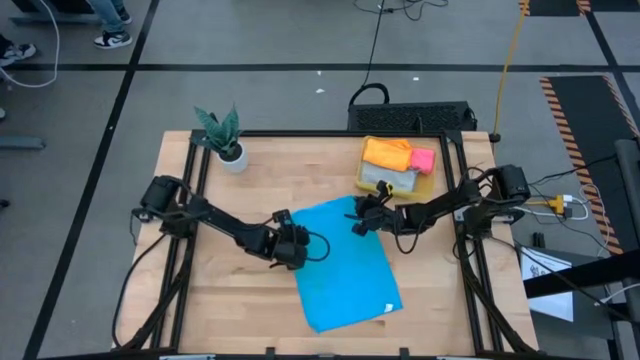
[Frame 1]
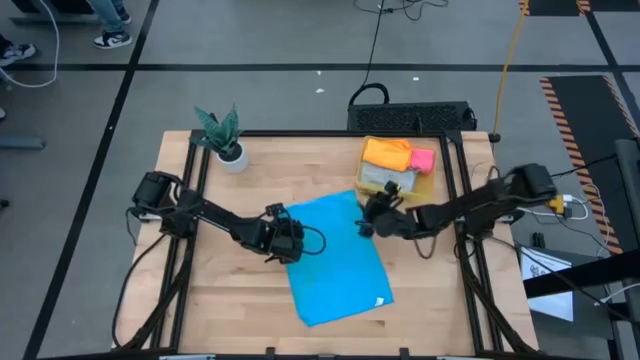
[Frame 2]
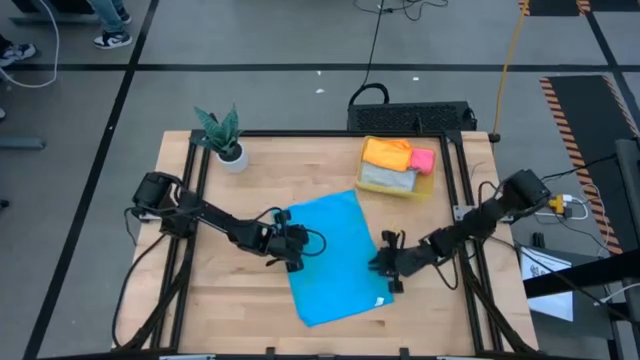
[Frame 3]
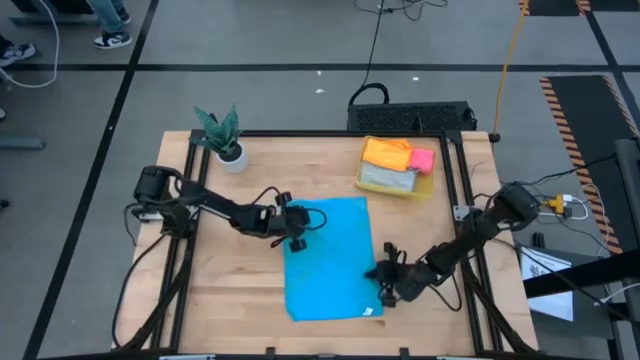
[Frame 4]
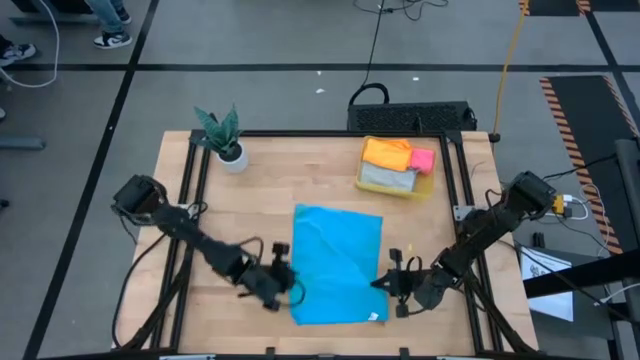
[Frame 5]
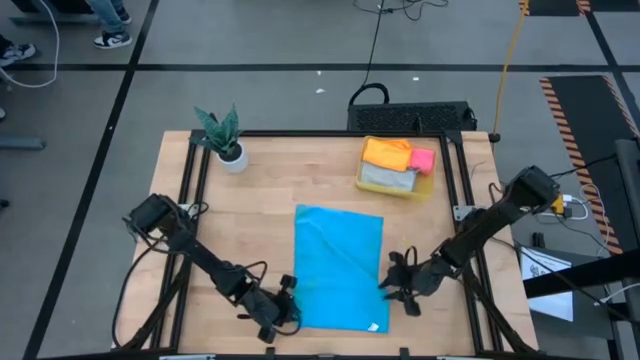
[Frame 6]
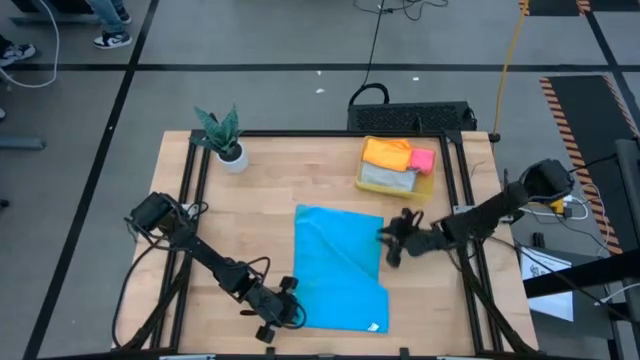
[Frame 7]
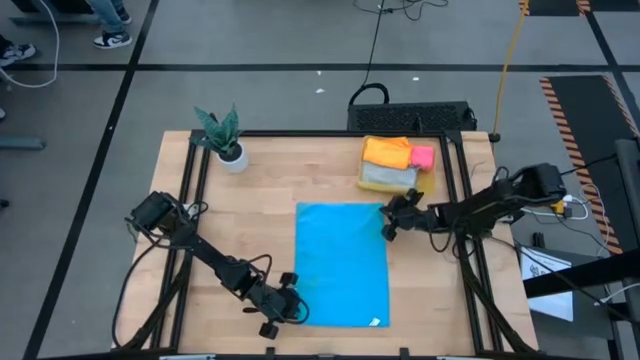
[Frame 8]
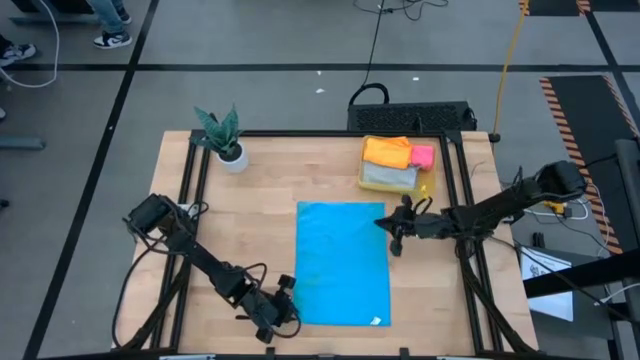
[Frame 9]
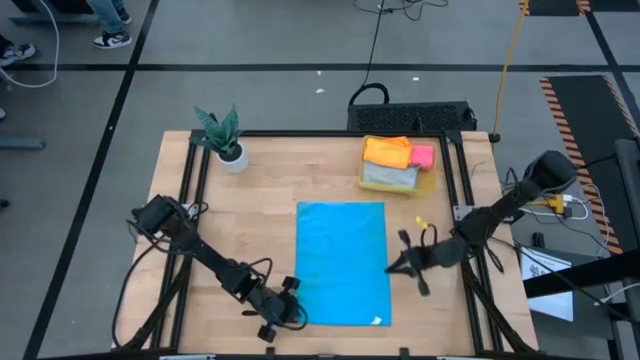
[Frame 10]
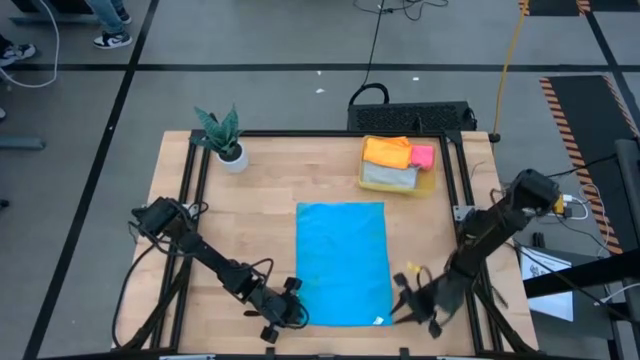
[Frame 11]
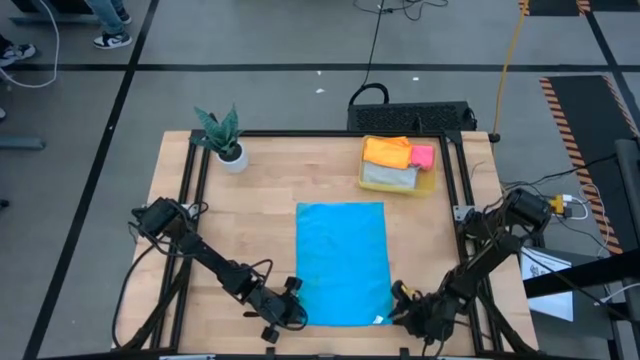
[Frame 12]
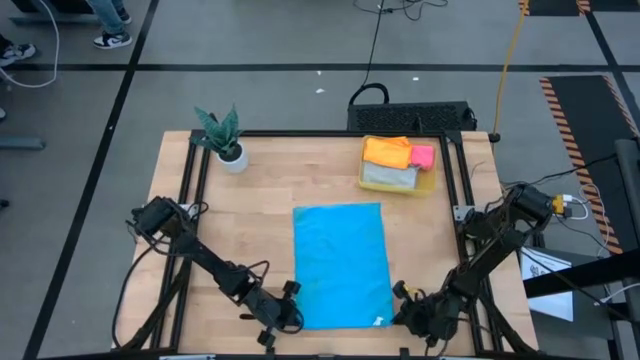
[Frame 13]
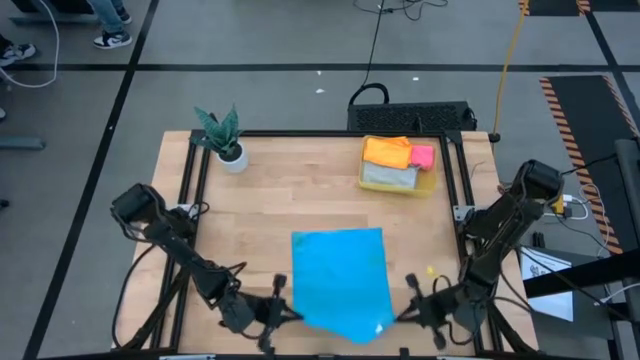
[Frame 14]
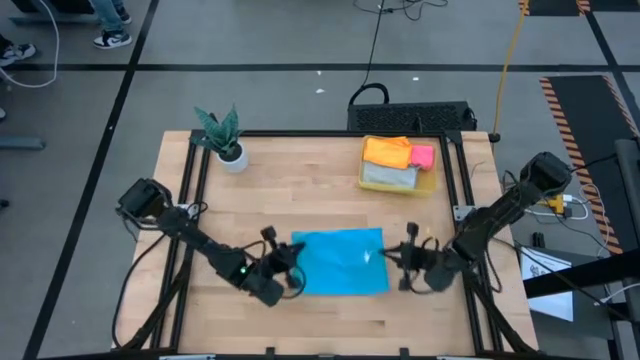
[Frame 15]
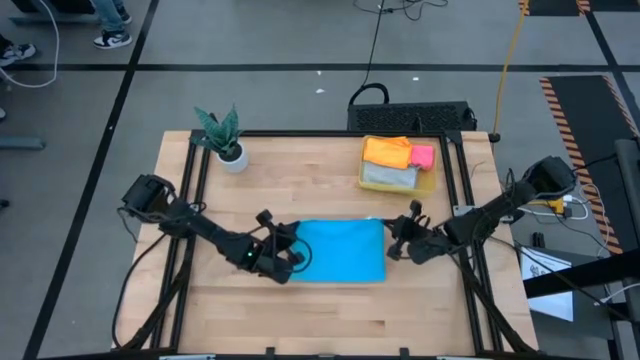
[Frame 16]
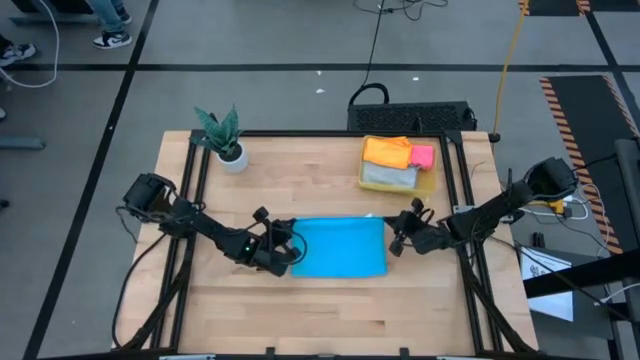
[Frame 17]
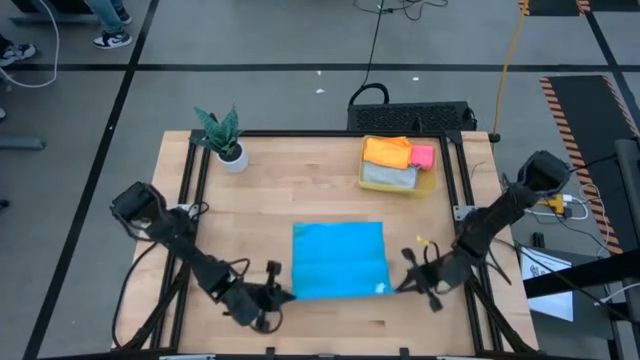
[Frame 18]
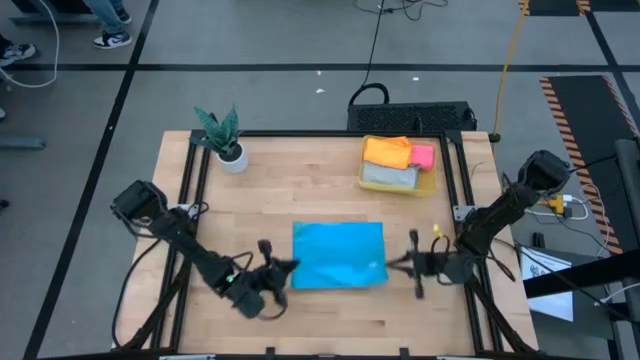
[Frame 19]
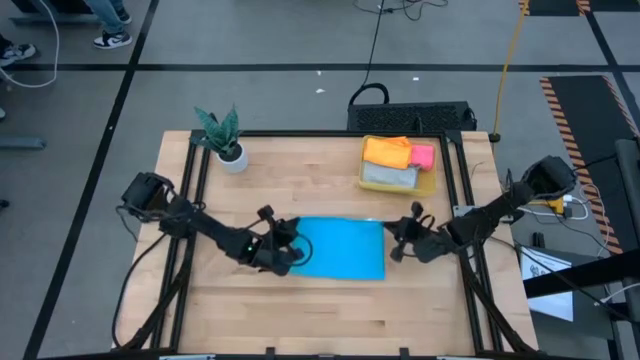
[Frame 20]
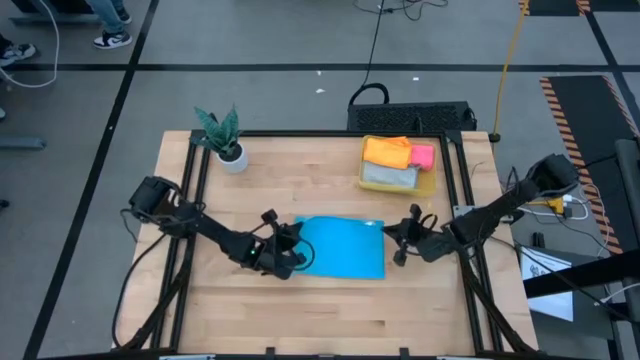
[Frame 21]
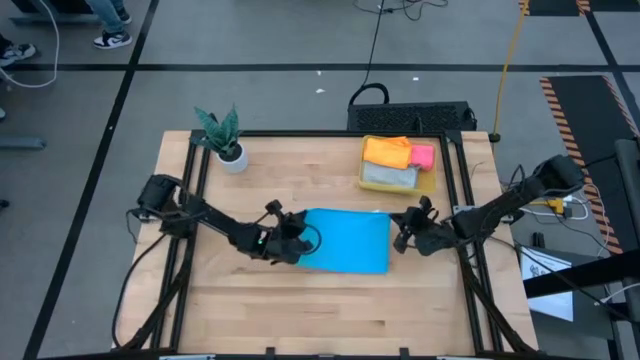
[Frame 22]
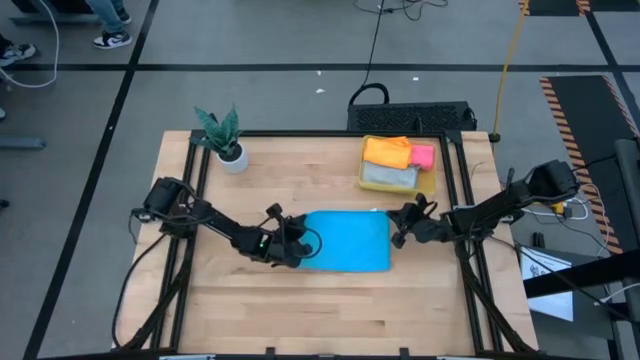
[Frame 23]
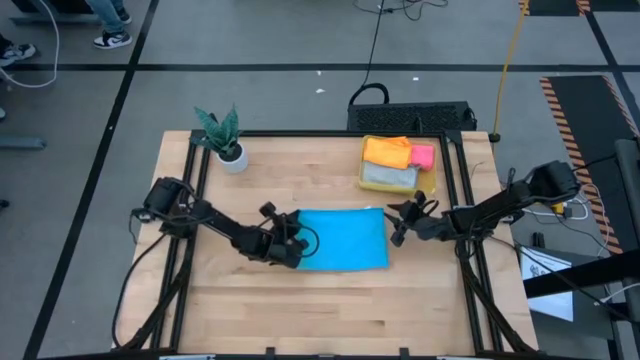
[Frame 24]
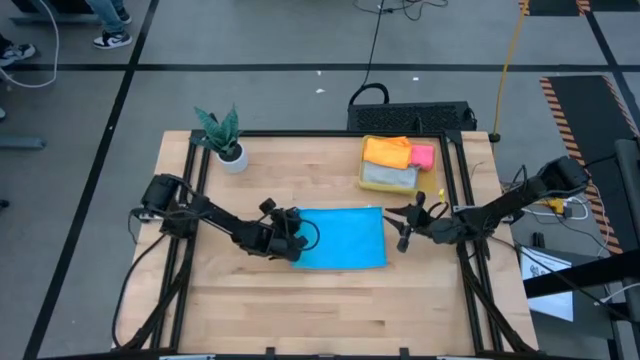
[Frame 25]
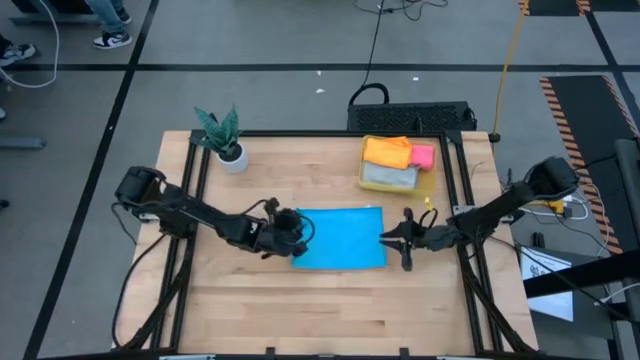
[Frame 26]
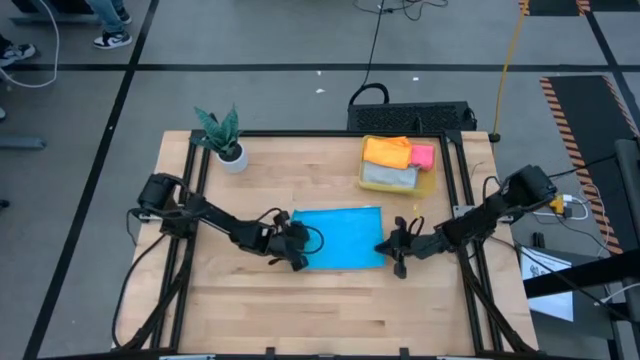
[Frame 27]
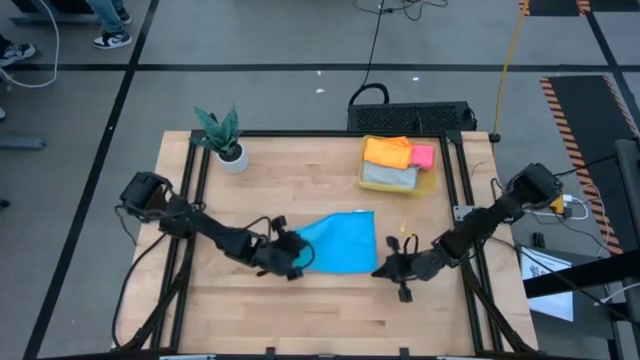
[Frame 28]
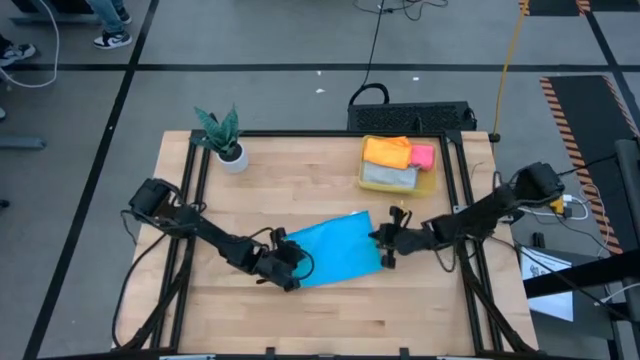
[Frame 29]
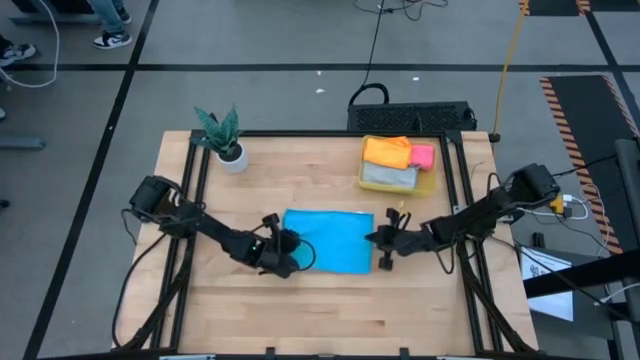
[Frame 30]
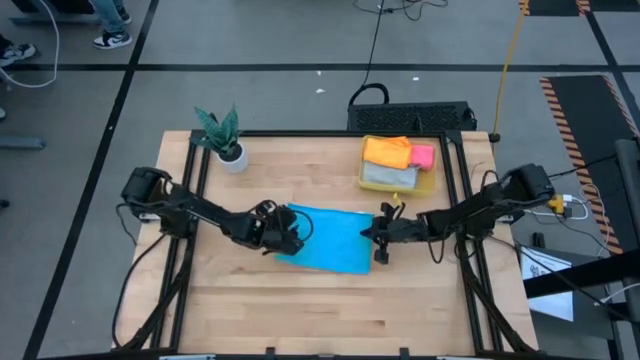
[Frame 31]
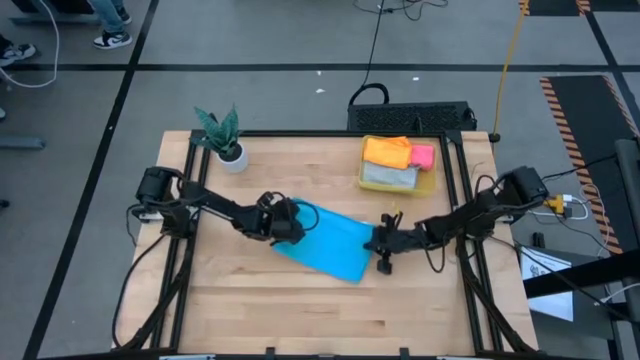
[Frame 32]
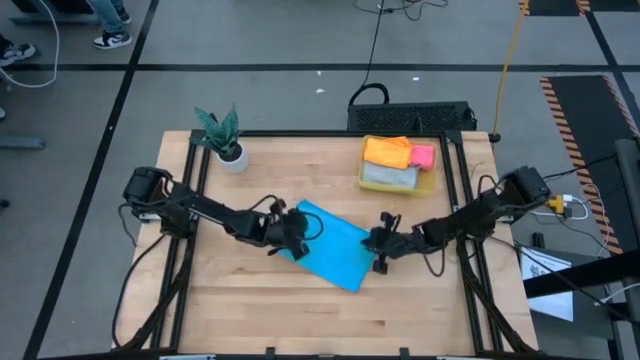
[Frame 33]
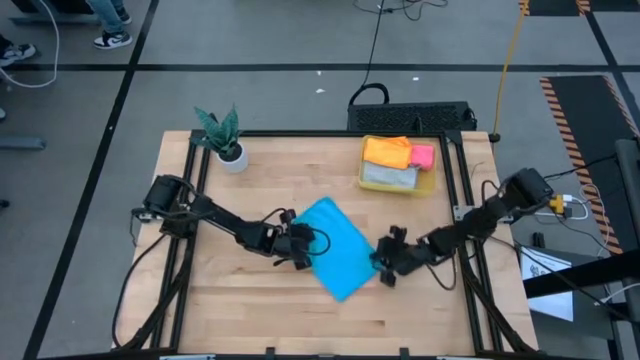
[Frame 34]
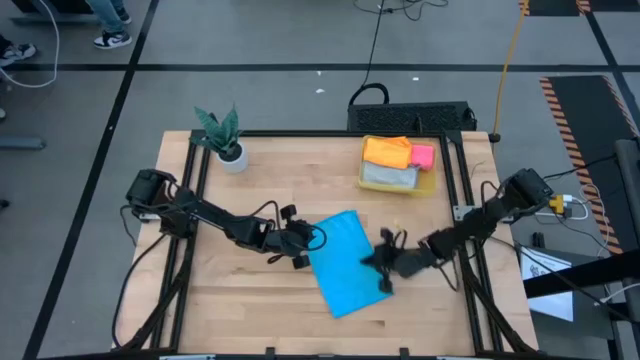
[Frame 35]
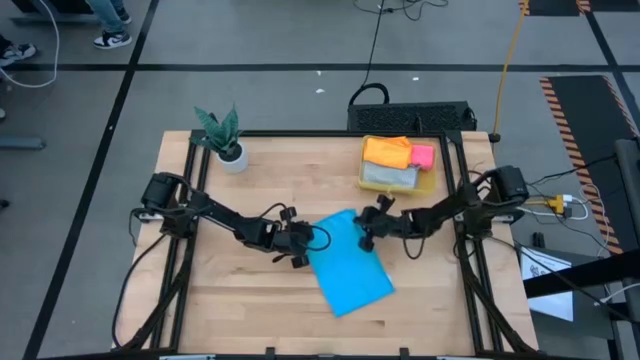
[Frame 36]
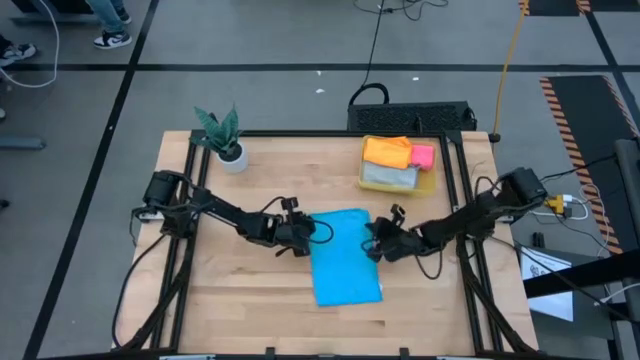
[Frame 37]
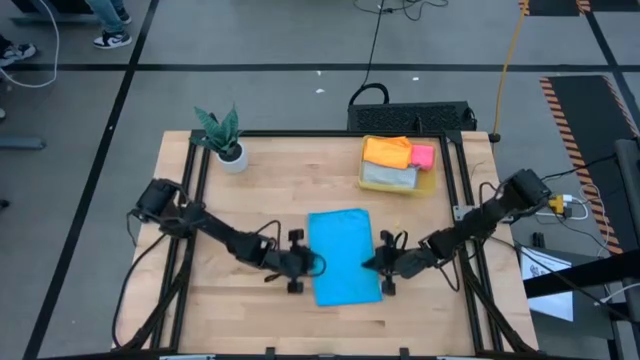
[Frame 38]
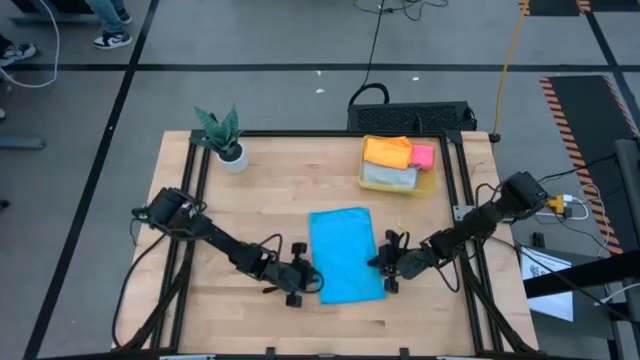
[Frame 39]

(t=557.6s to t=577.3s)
Task: Fold microfiber towels
Fold the blue kitchen towel
